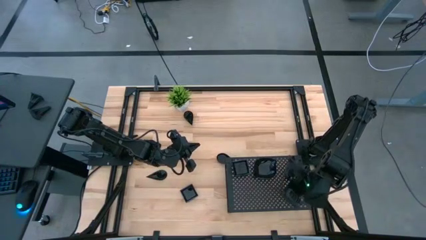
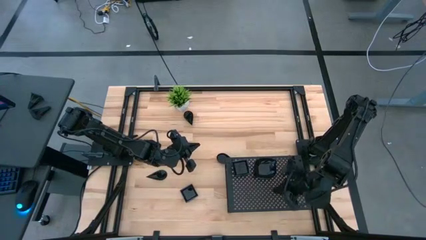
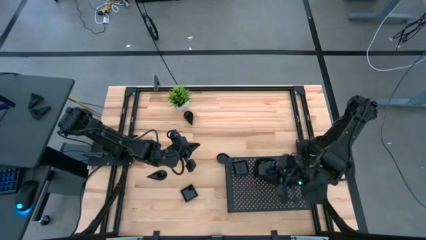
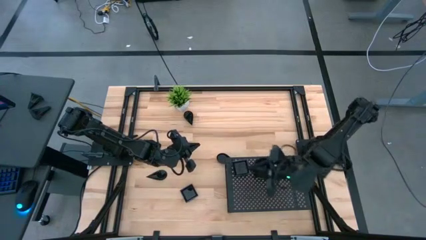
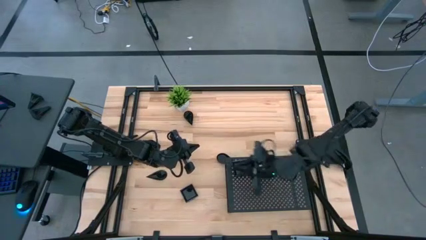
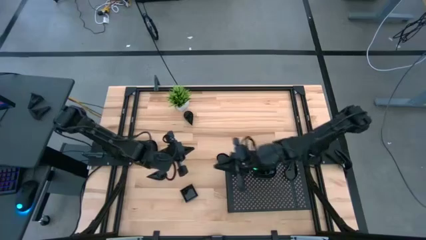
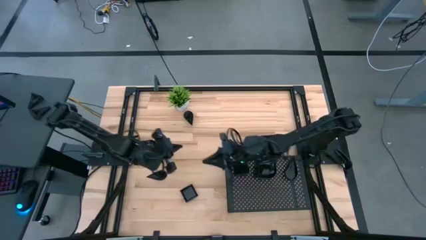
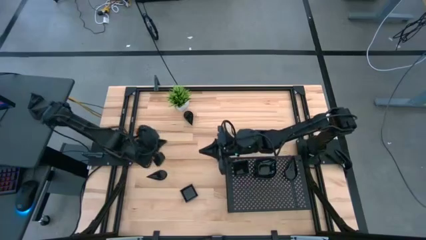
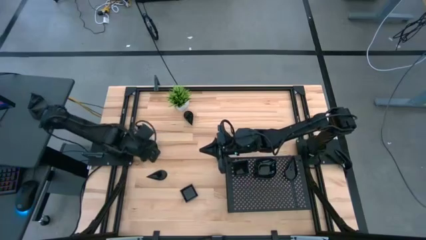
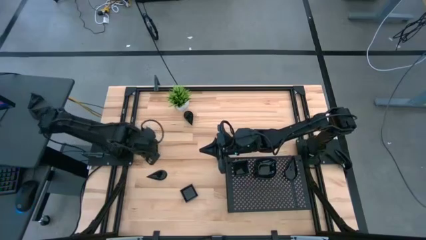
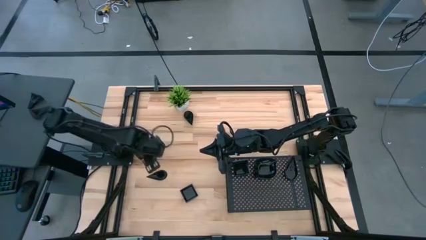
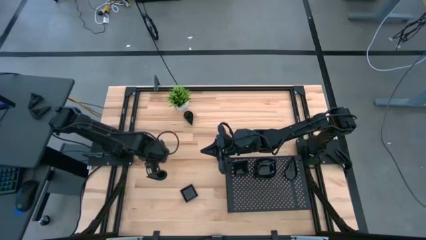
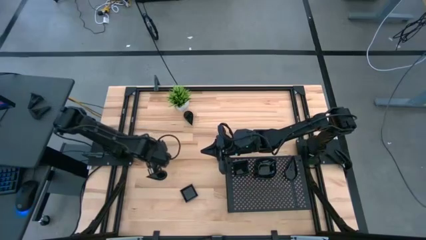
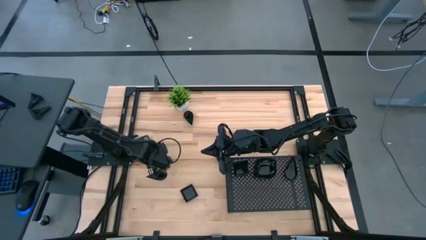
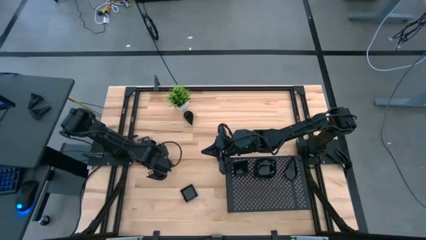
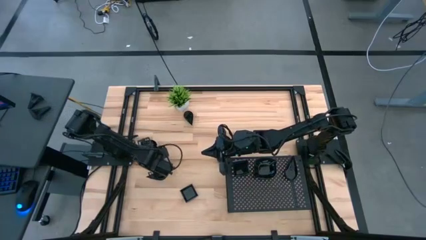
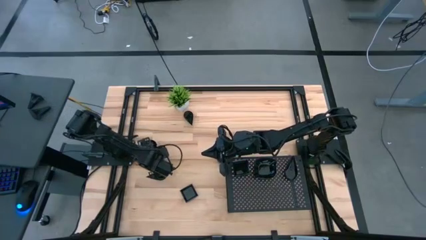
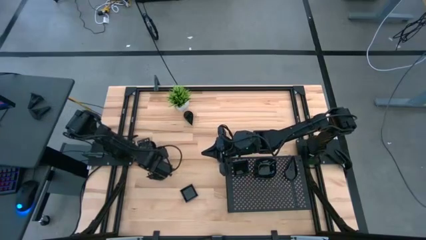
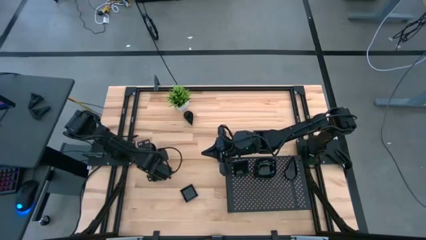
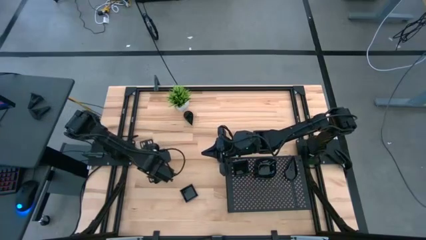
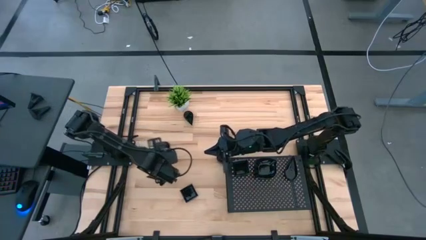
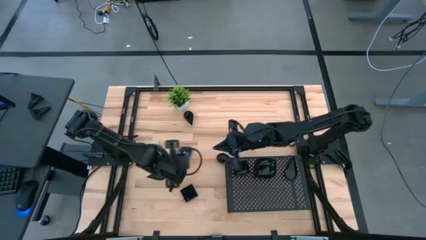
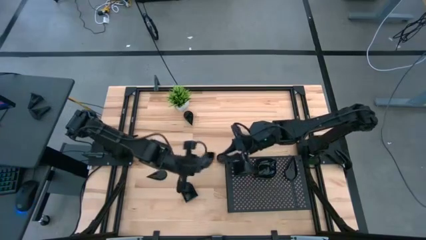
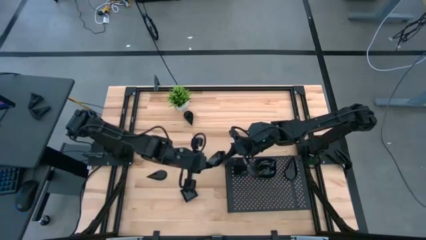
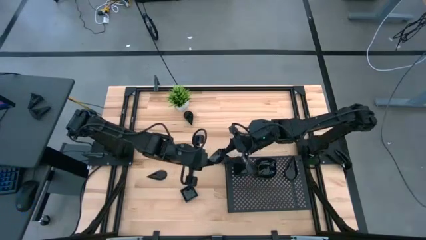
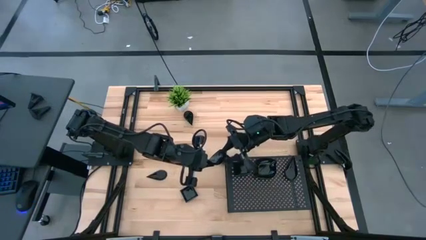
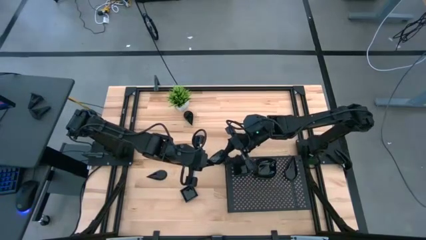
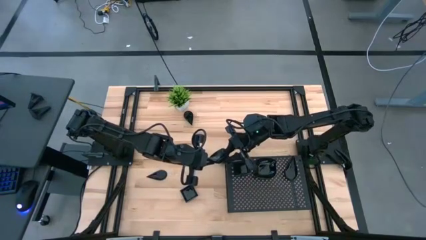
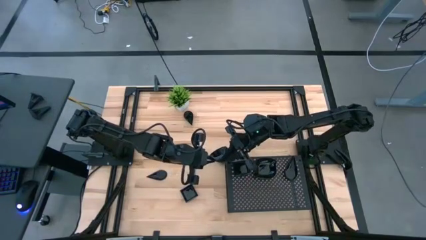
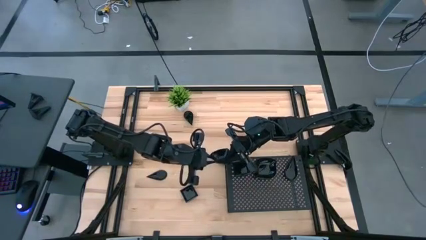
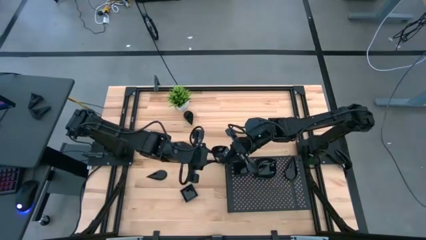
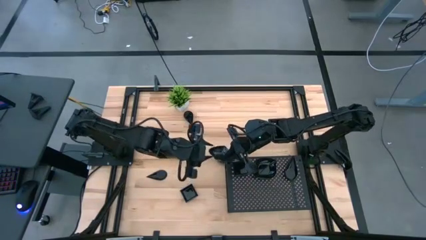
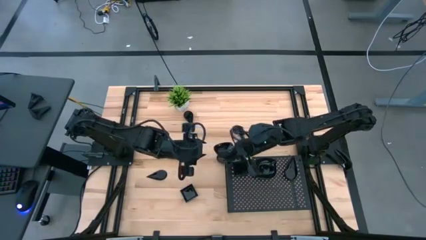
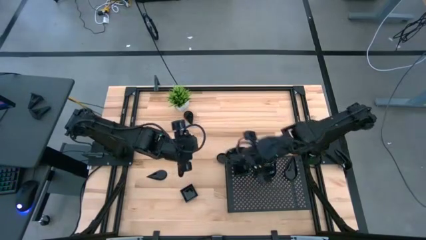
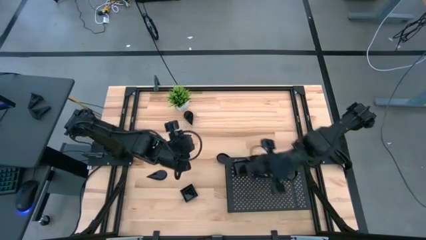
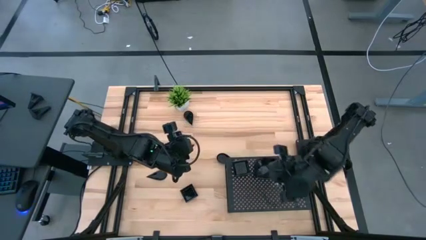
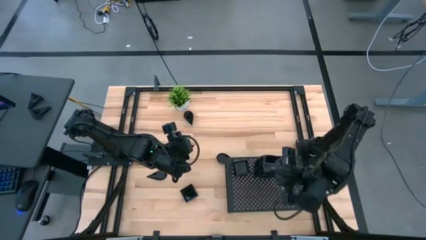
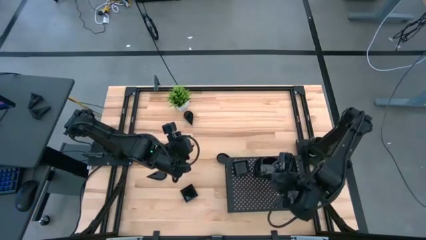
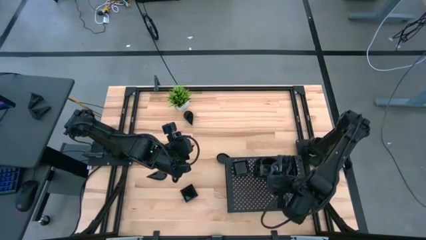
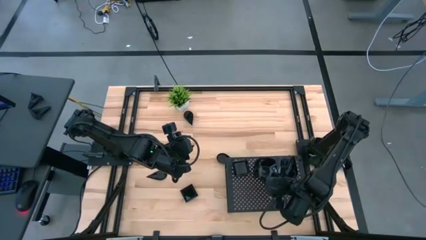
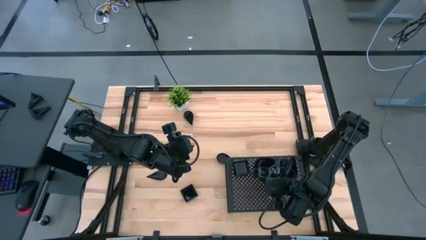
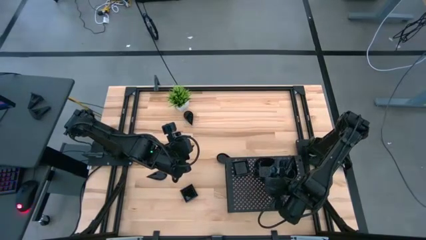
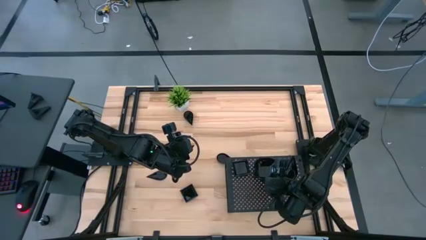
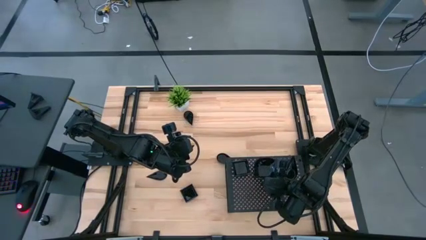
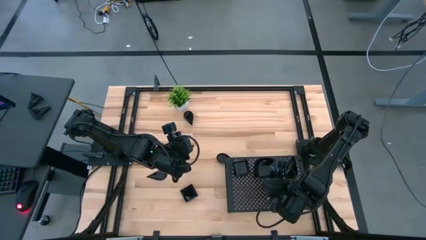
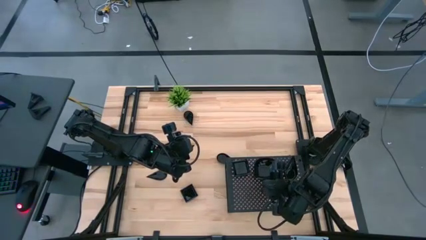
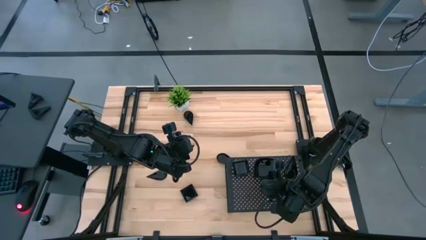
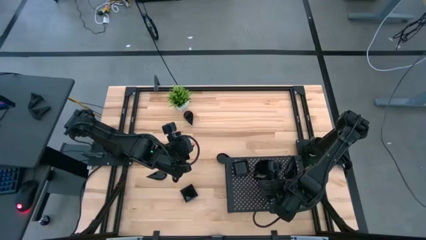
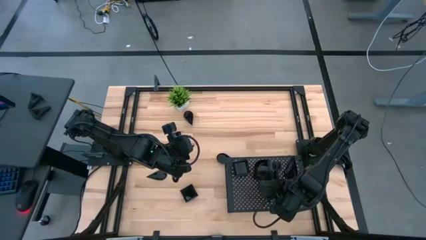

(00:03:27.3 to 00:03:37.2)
Task: Pick & Place Mini shaped plates
Stack the leaf shaped plate on top of the leaf shaped plate on the shelf

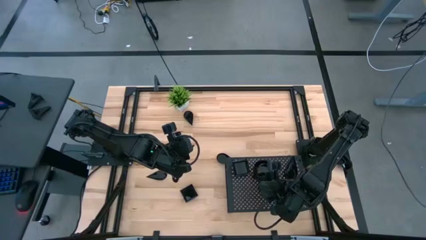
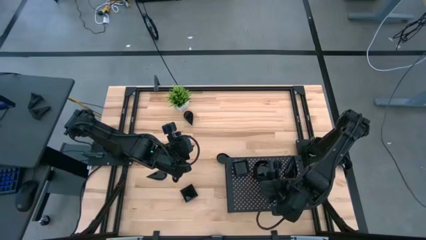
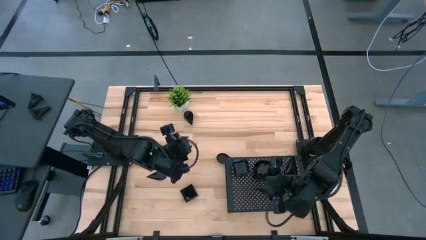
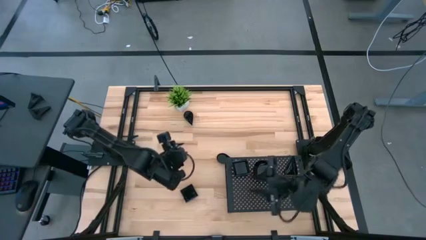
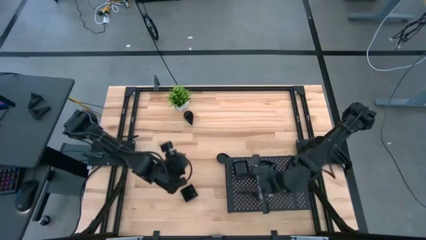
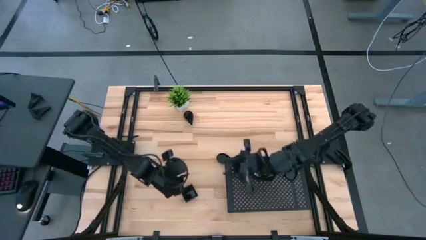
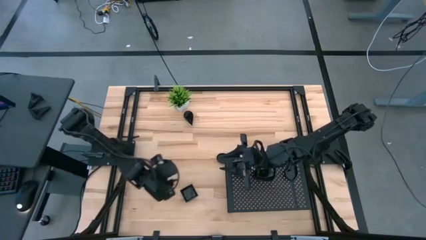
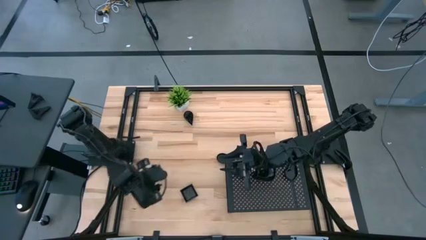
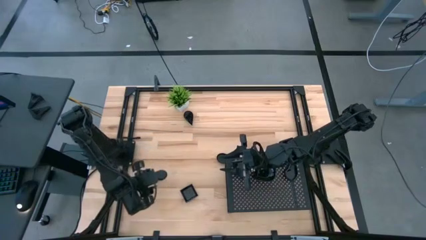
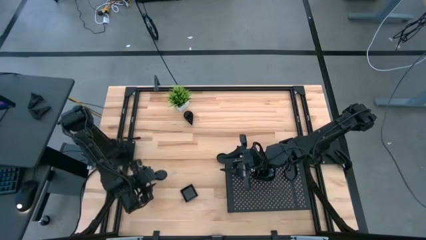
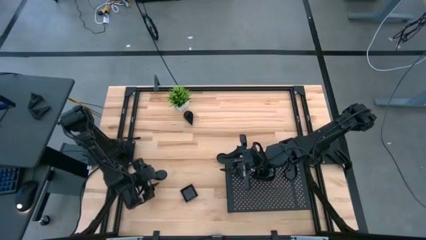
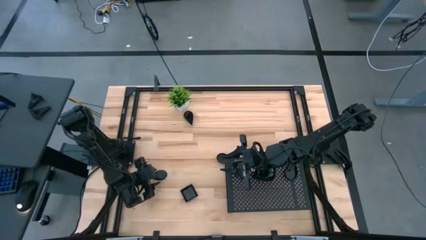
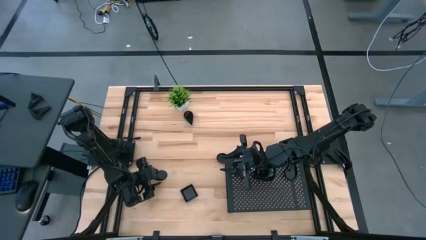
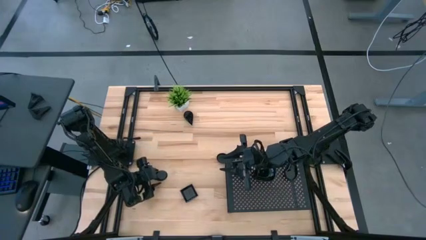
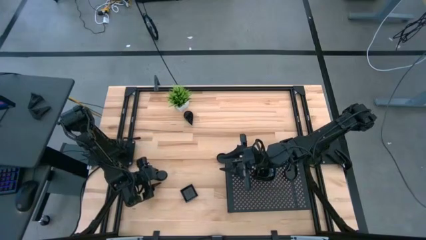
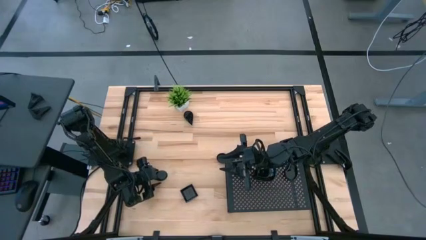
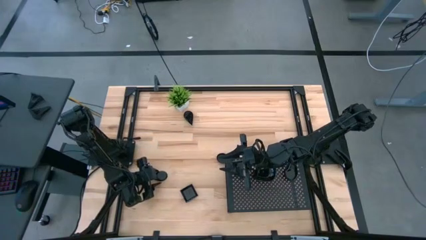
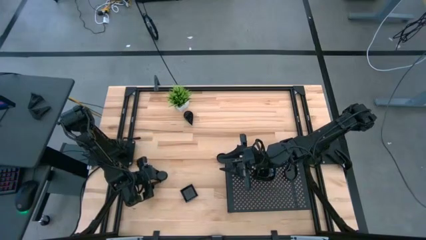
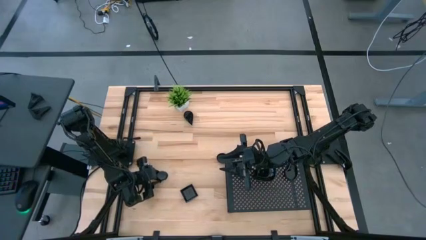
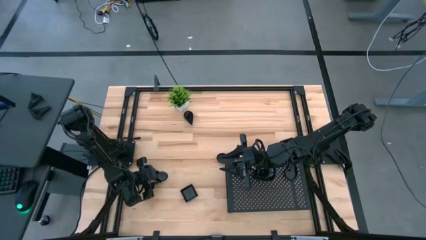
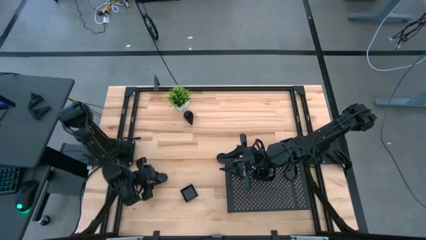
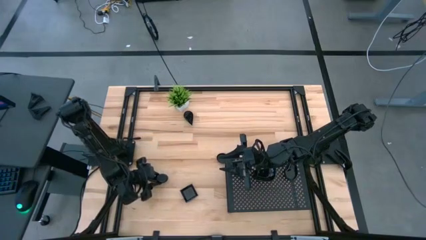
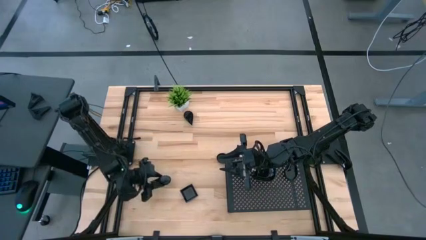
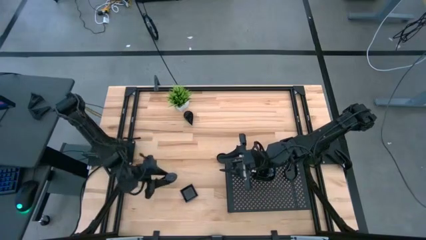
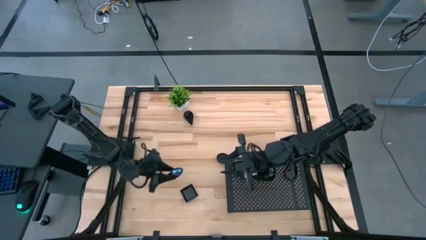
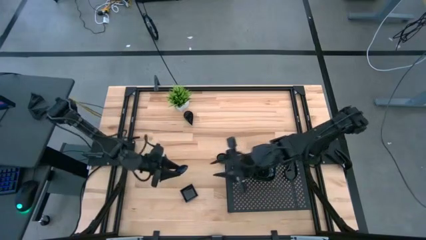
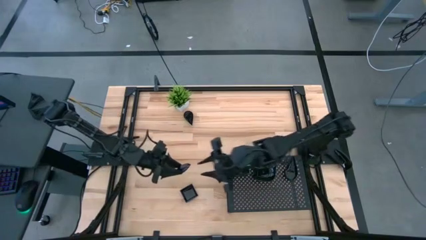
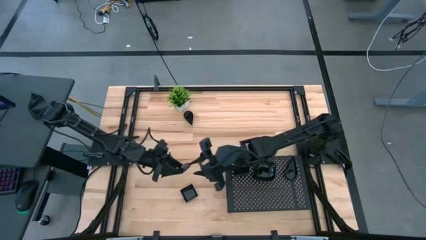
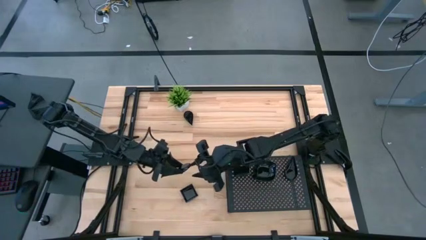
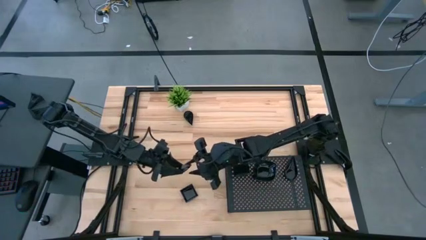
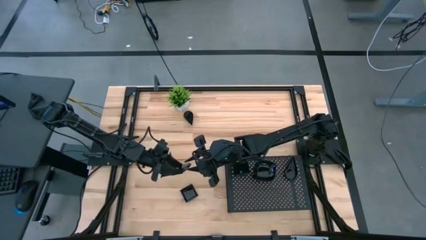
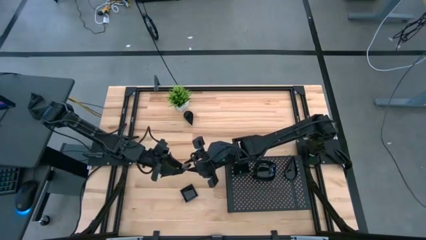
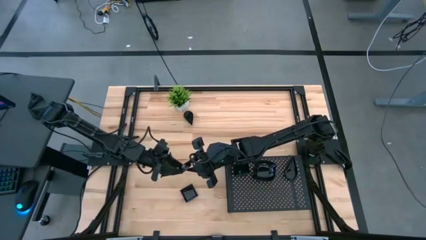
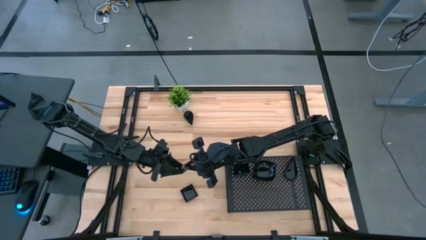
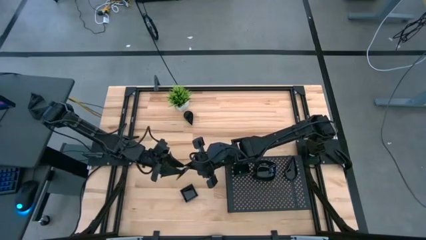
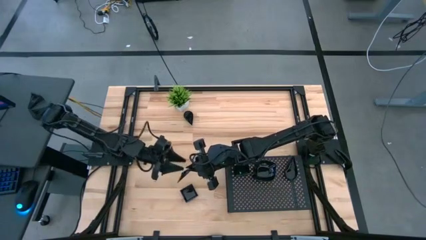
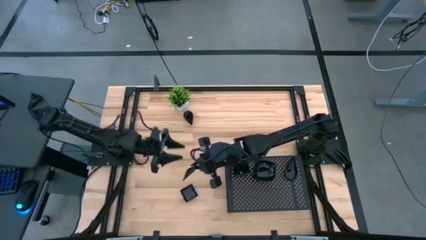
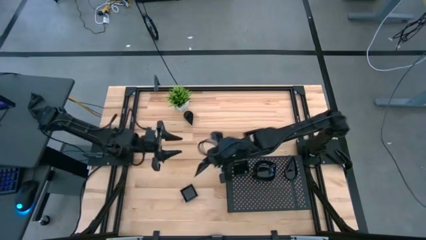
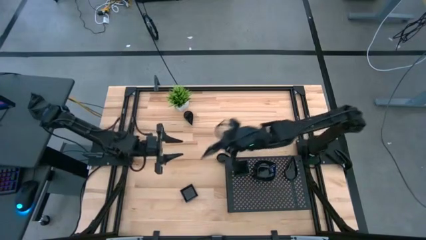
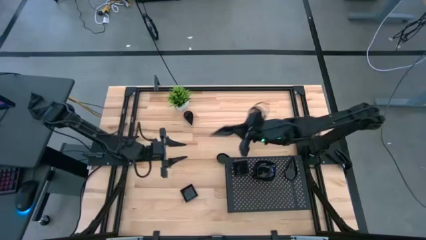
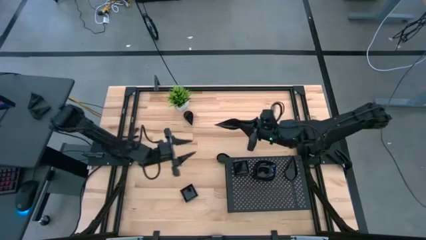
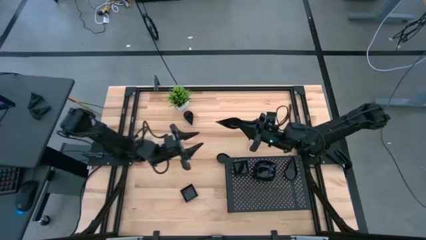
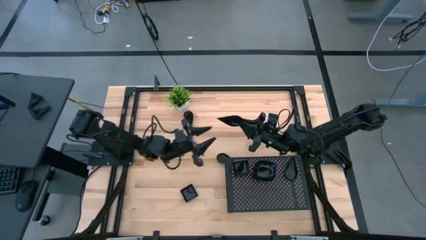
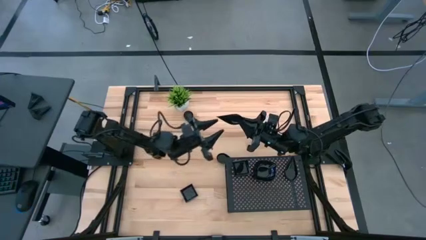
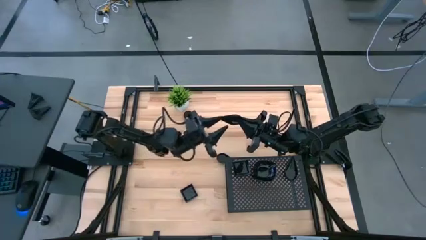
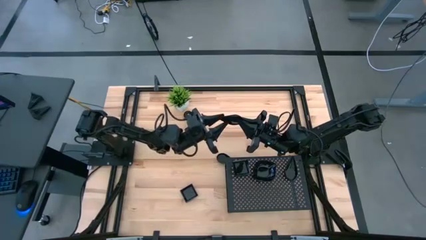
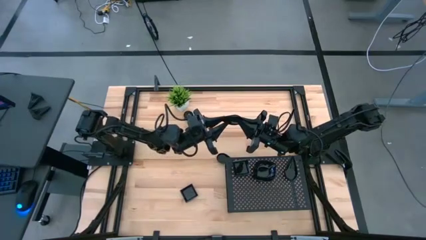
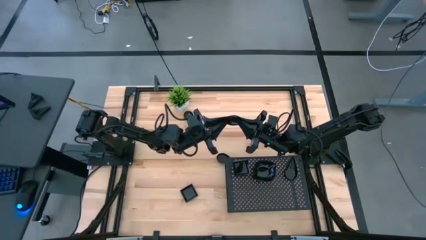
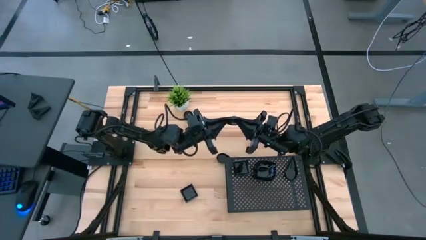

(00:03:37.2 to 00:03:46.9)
Stack the drop shaped plate on top of the drop shaped plate on the shelf
